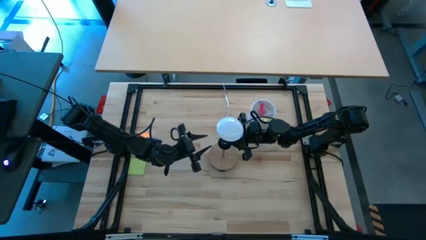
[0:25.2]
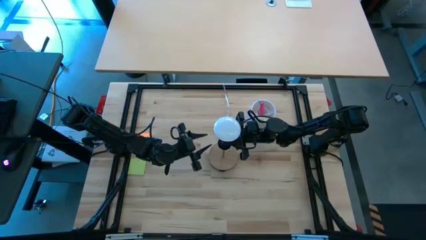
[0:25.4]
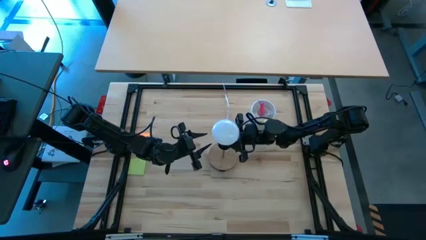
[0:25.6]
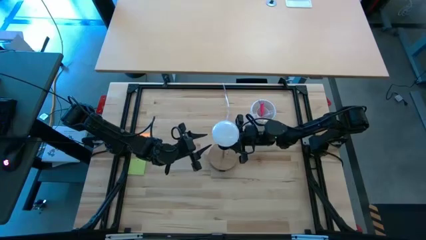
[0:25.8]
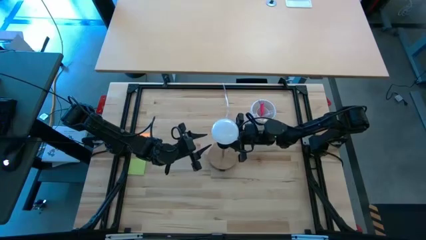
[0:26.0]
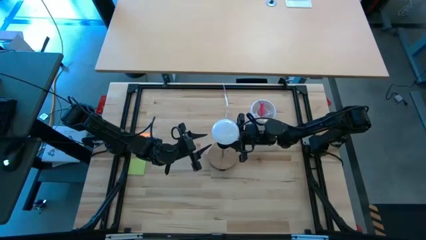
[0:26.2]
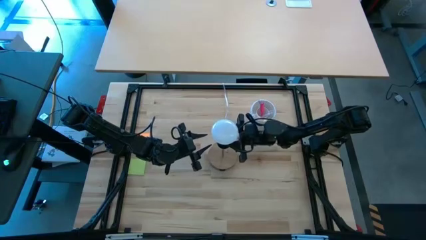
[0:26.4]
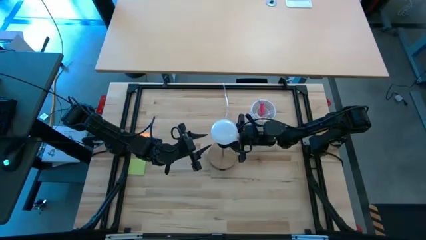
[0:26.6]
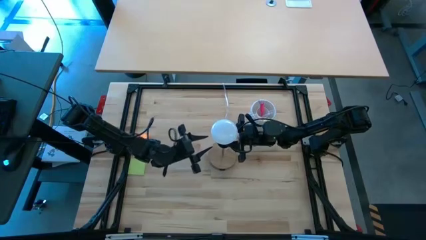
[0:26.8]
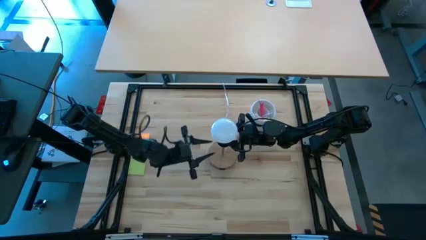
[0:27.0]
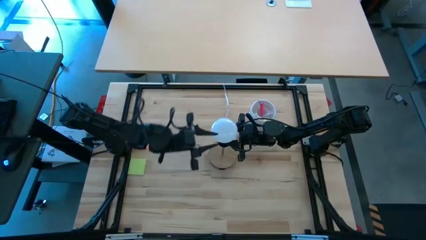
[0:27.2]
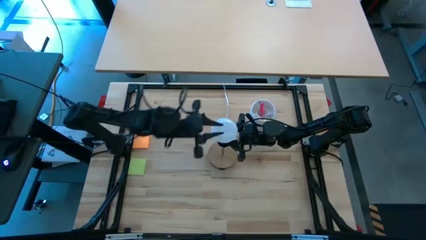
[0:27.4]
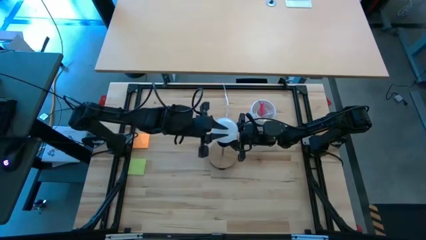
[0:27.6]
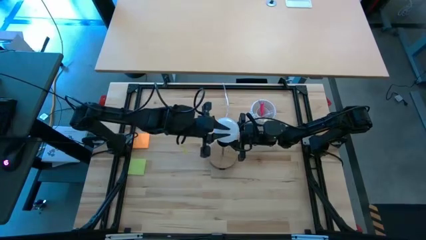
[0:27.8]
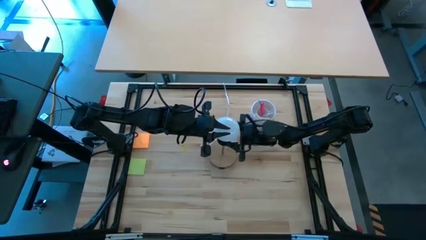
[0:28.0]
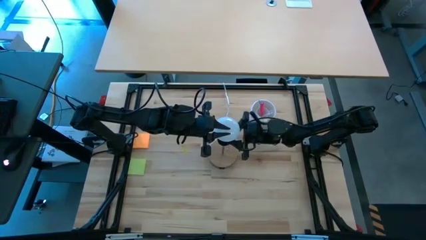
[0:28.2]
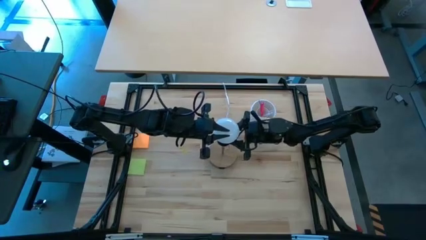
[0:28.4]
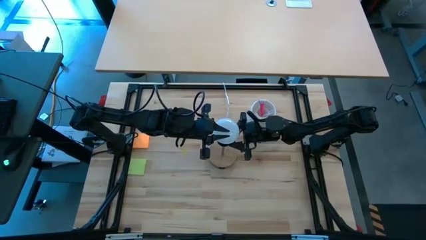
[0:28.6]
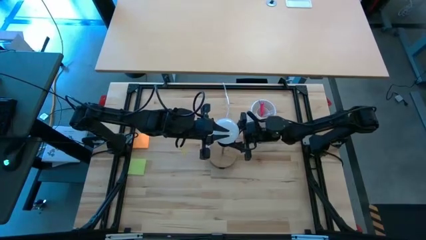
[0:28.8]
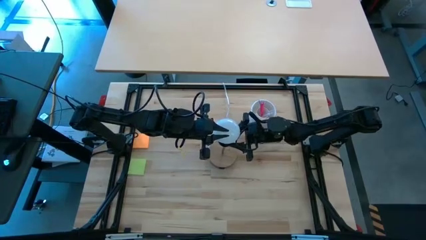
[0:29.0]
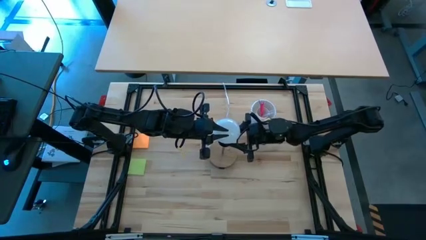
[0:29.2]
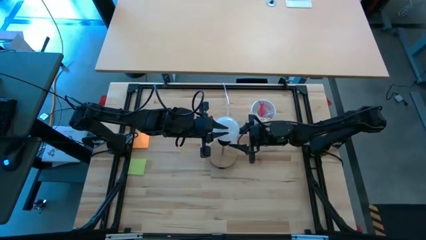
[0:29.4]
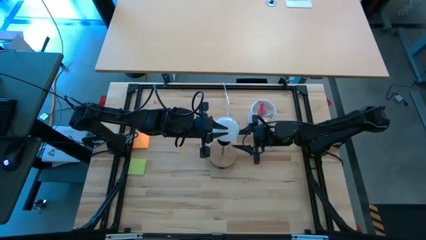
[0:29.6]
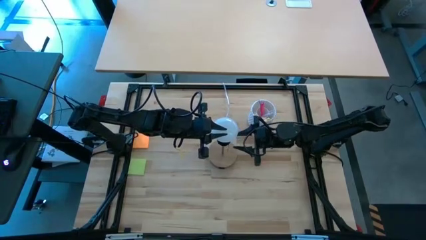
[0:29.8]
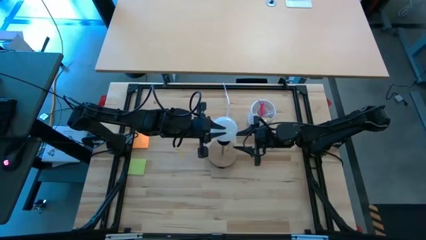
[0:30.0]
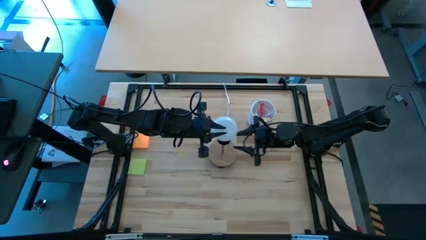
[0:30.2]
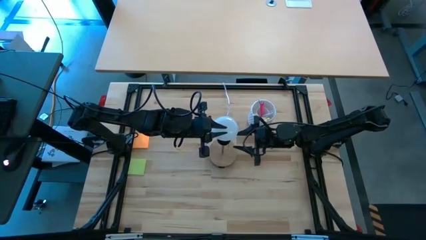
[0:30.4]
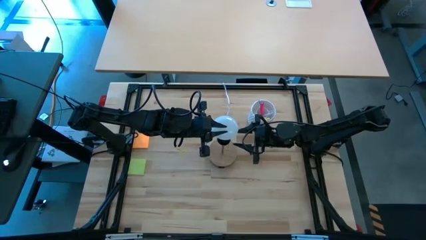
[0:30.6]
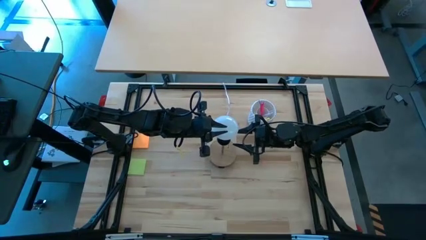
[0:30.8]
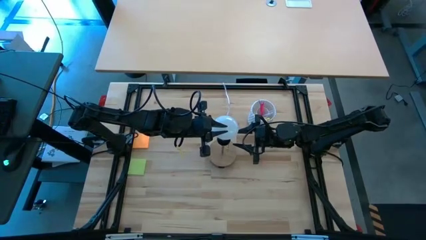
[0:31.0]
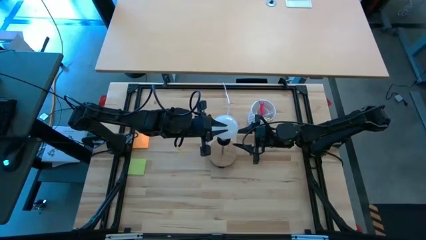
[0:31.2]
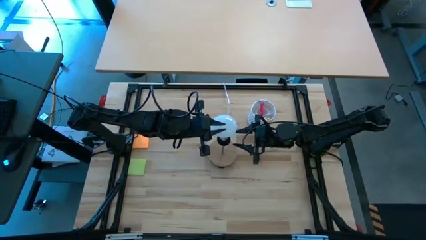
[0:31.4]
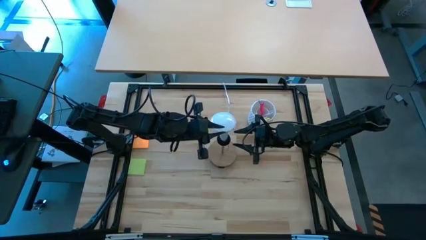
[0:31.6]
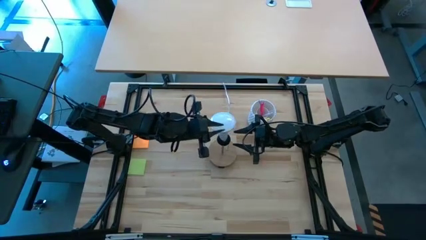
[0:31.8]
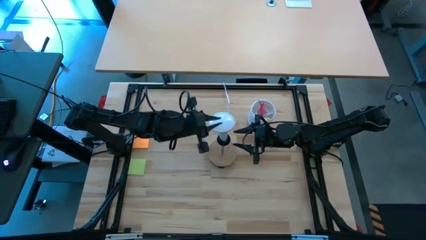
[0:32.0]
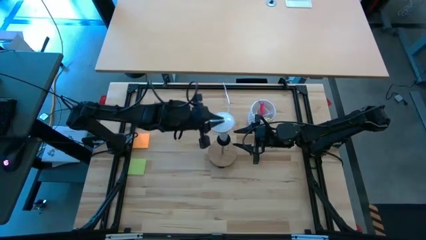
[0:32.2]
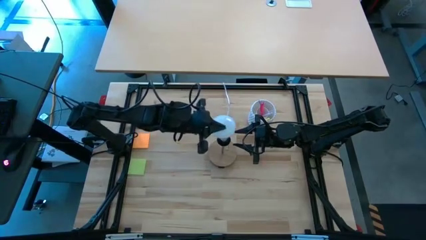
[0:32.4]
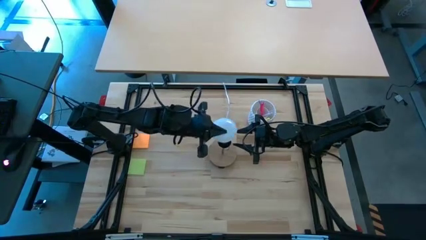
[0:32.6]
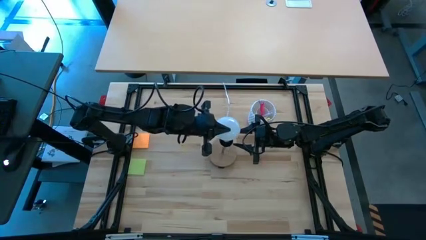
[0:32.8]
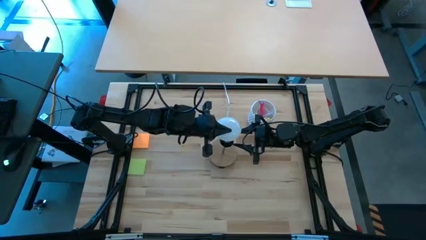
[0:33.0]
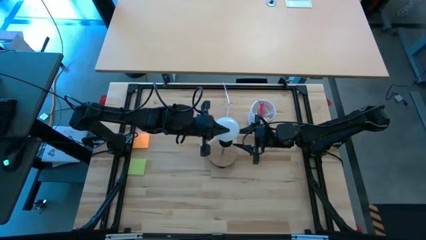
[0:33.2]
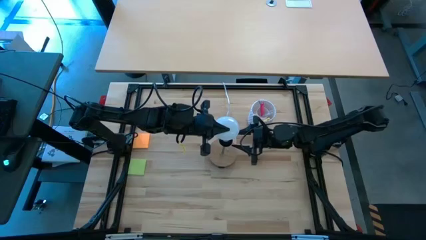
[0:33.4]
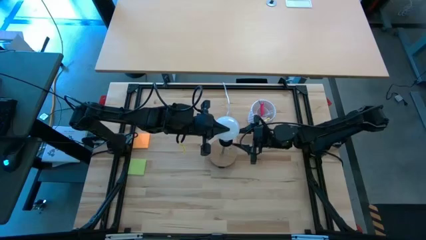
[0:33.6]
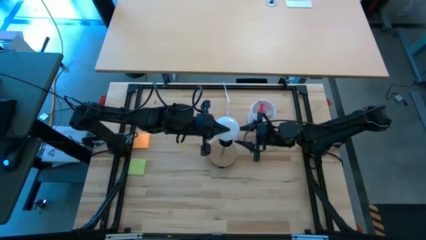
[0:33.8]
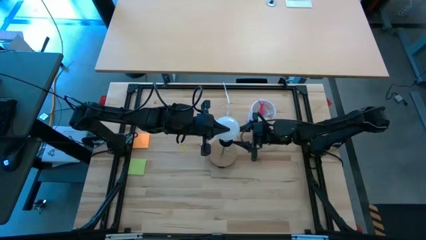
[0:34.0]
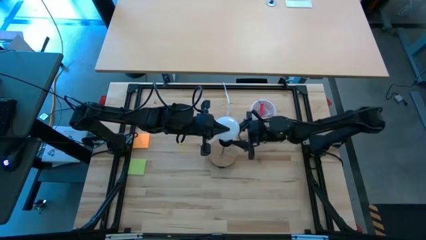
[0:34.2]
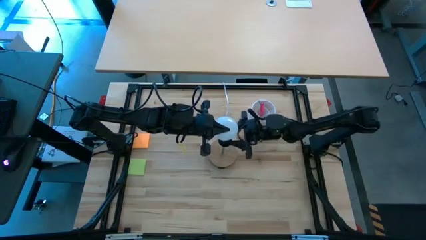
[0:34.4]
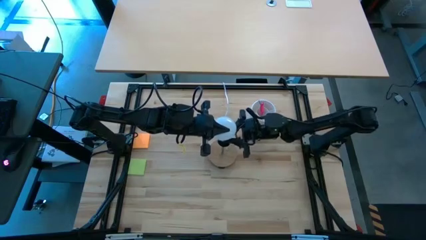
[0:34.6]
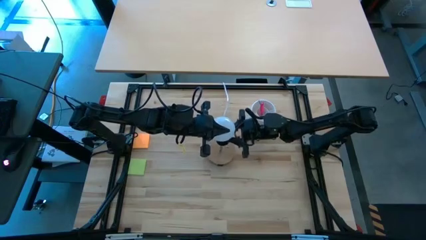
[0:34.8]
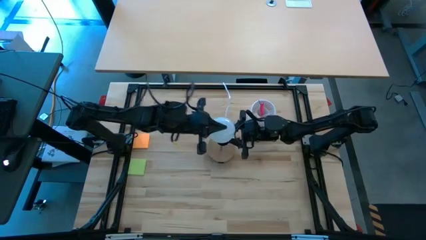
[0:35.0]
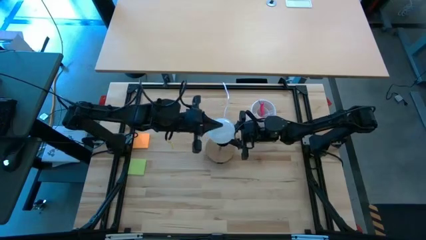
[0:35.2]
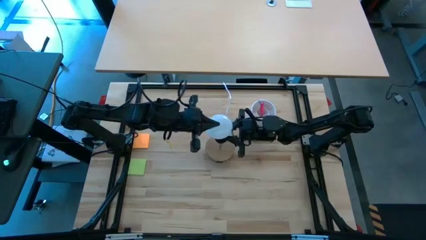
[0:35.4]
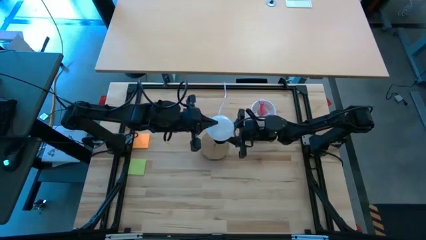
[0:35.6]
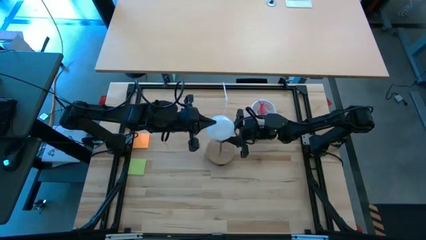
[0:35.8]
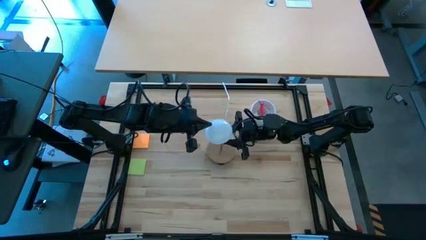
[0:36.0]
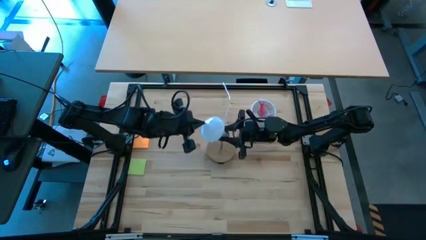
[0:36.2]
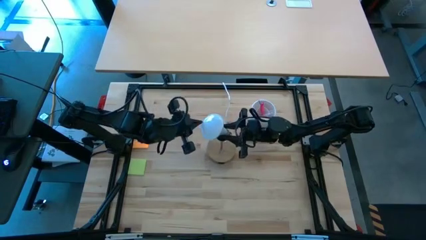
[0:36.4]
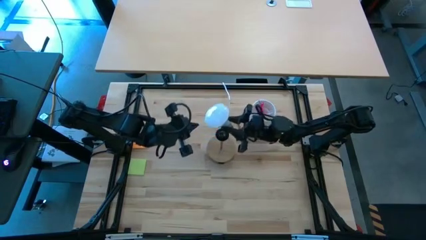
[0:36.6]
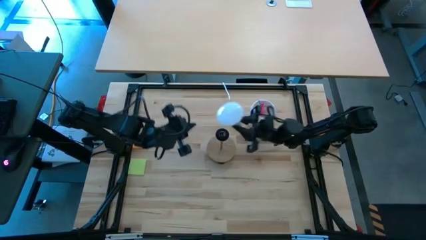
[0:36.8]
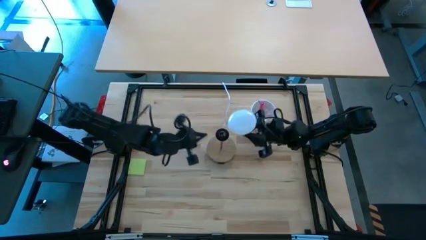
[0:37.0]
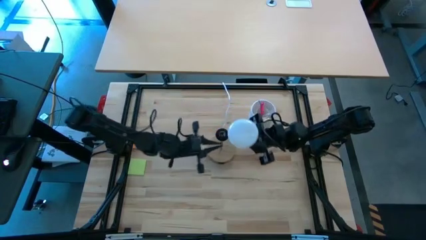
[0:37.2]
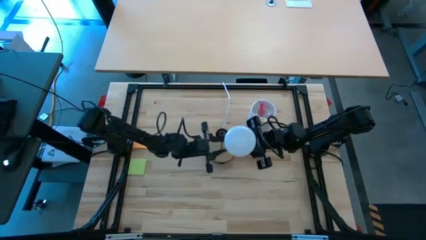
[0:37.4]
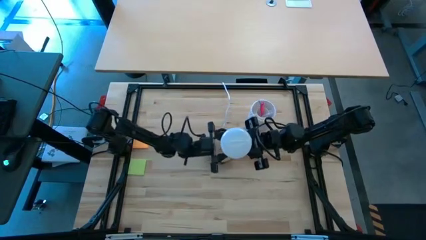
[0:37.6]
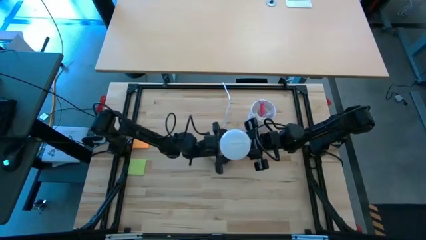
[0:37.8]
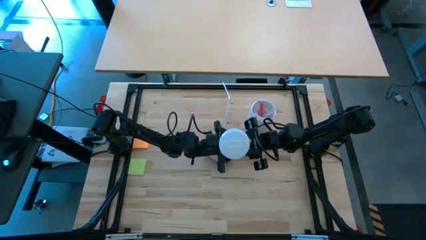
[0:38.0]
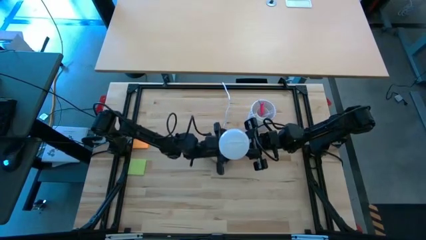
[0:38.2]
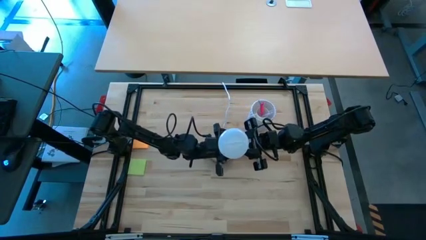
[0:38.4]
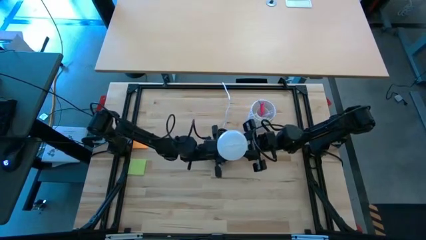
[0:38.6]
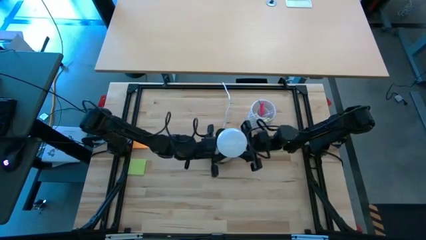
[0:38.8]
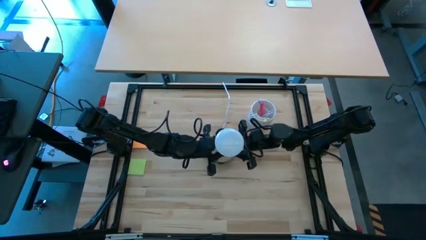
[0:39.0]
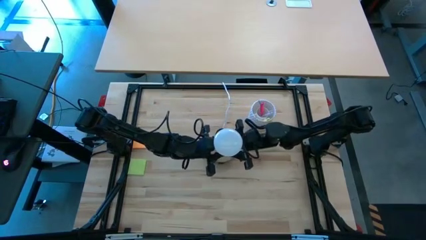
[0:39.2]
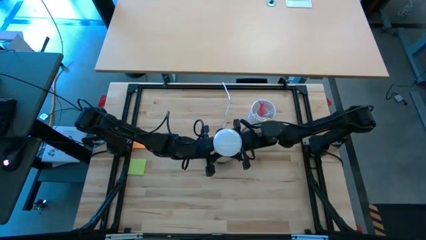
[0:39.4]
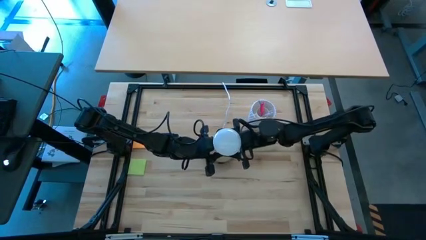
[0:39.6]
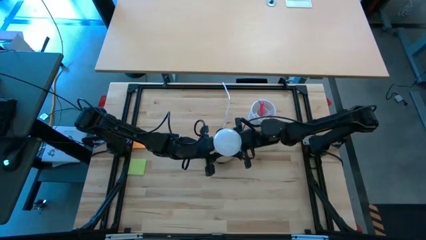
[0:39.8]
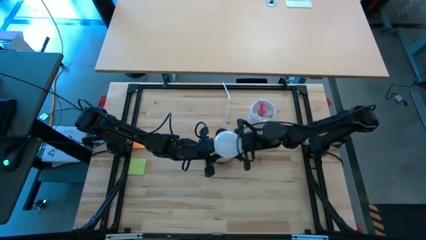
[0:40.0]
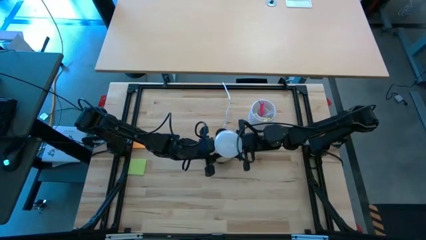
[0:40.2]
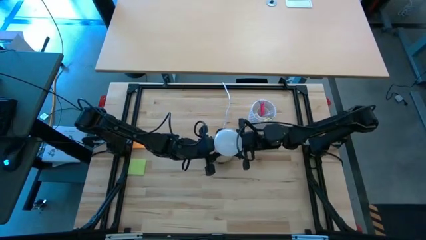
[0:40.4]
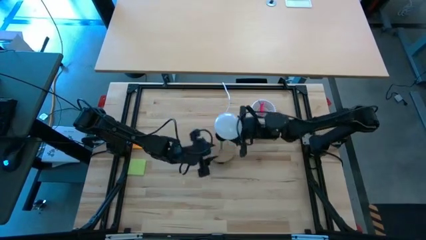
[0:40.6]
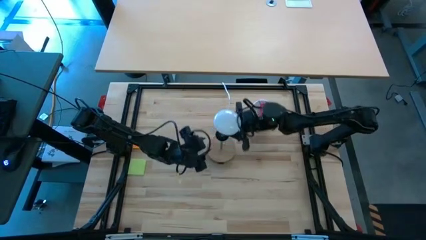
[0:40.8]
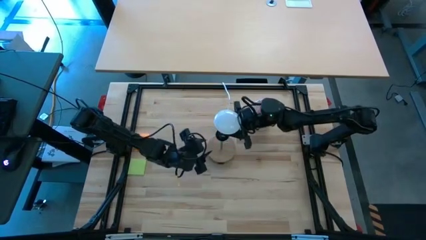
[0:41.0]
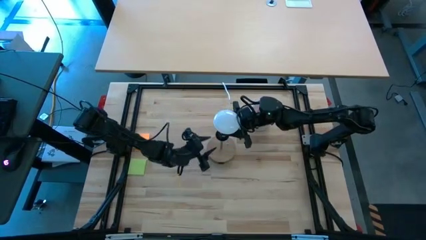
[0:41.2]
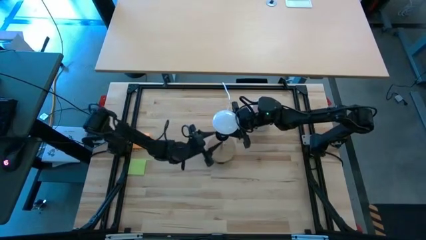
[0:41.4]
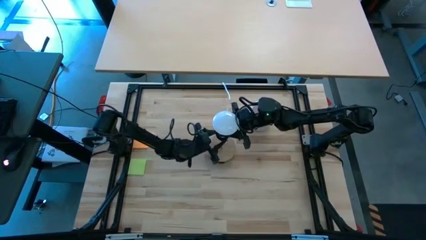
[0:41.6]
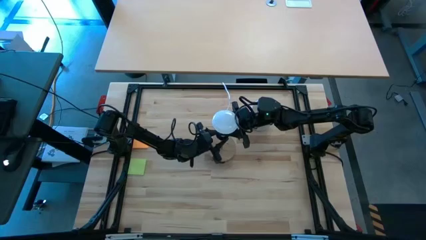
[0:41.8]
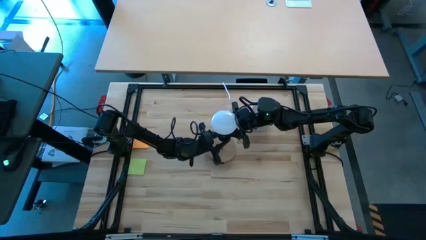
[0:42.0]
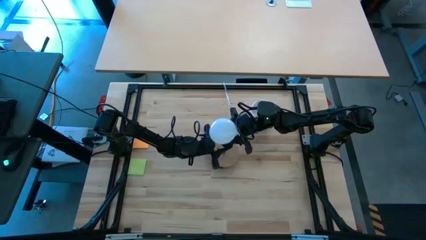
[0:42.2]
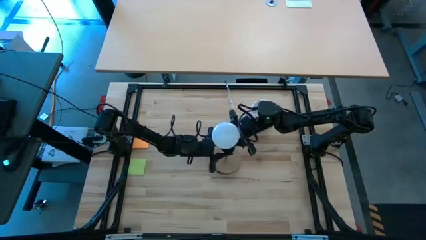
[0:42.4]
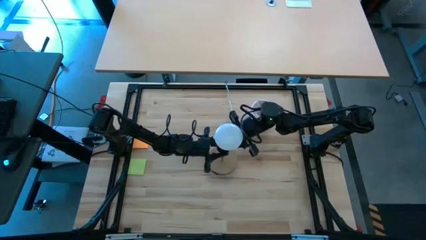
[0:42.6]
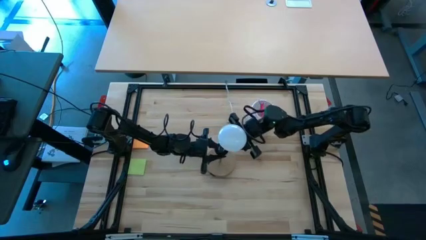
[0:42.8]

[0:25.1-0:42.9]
Task: Screw lightbulb
Insert the light bulb into the brown lamp
